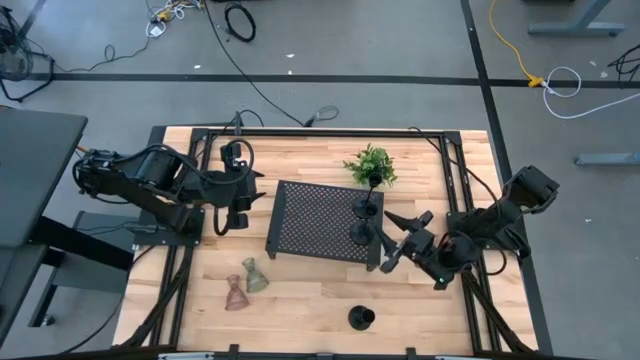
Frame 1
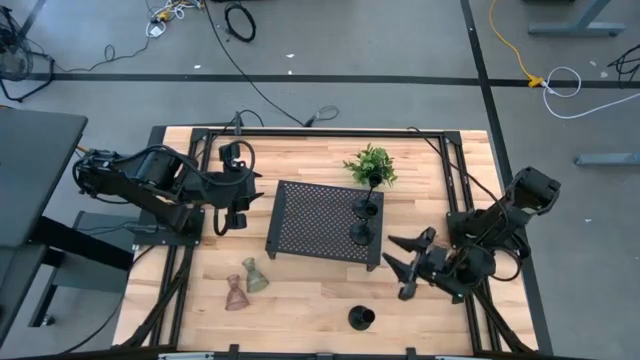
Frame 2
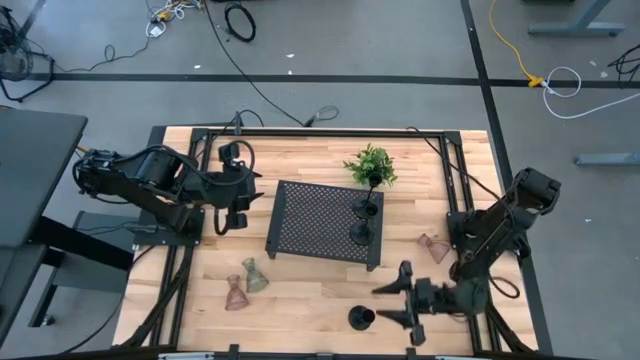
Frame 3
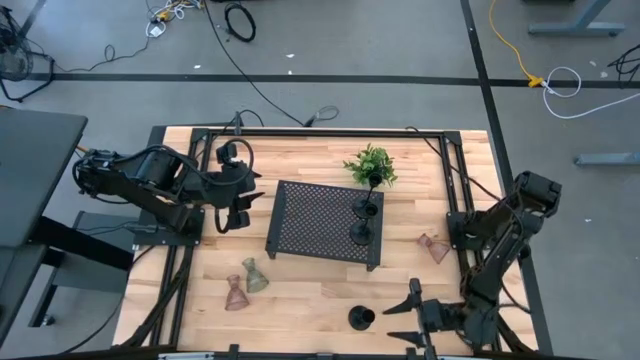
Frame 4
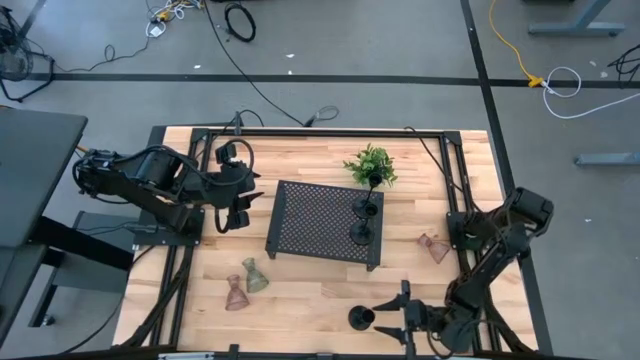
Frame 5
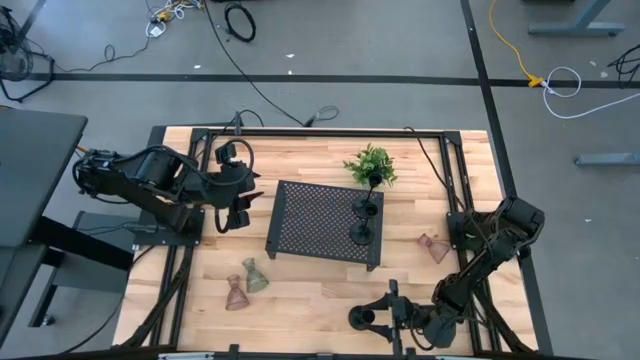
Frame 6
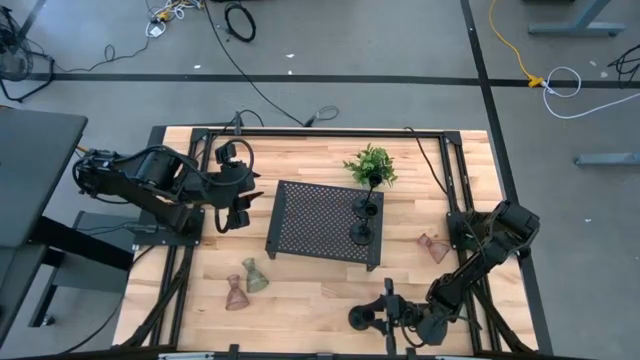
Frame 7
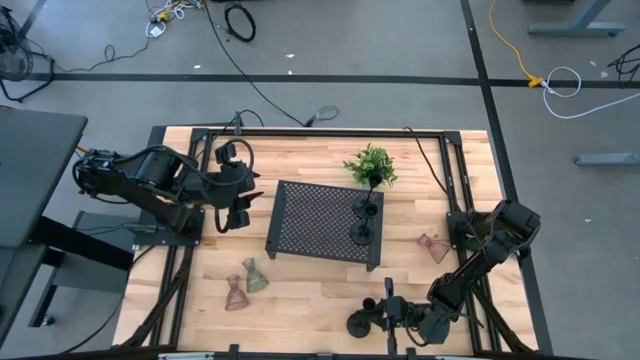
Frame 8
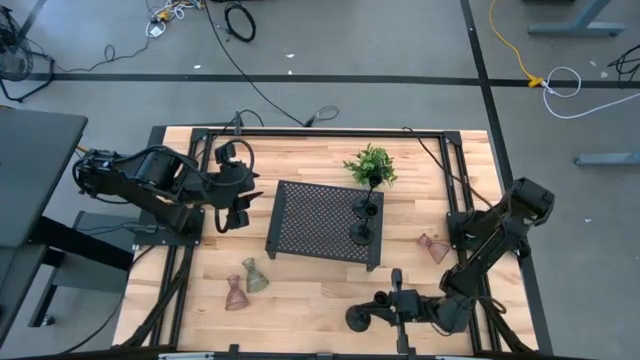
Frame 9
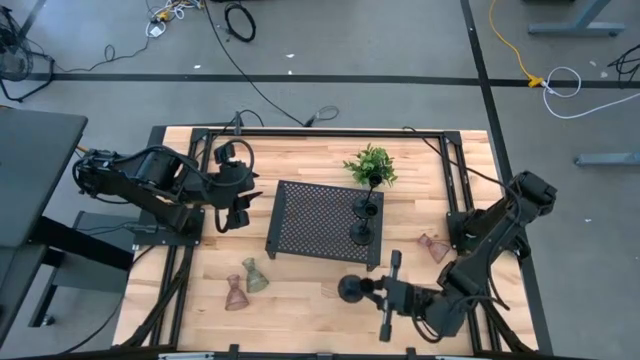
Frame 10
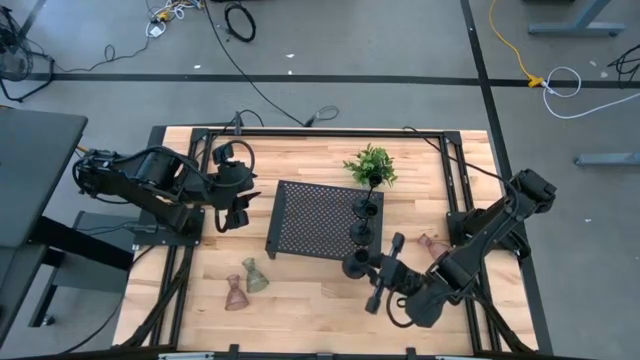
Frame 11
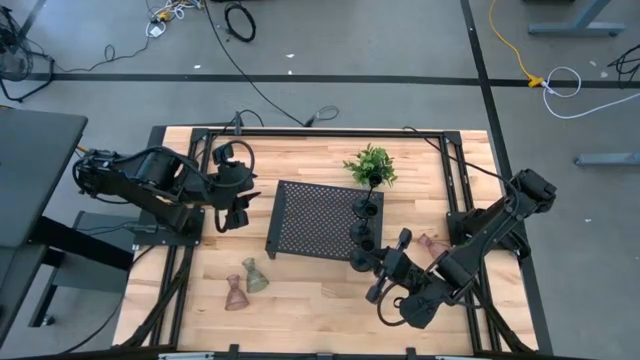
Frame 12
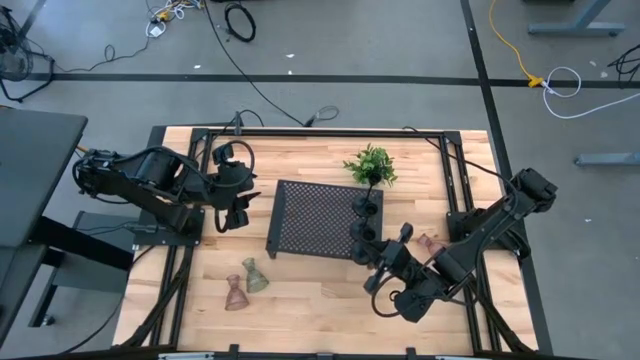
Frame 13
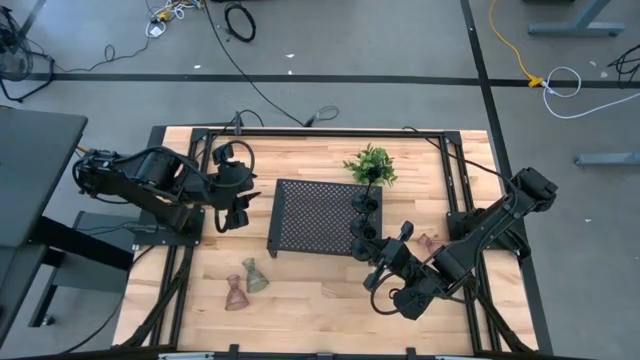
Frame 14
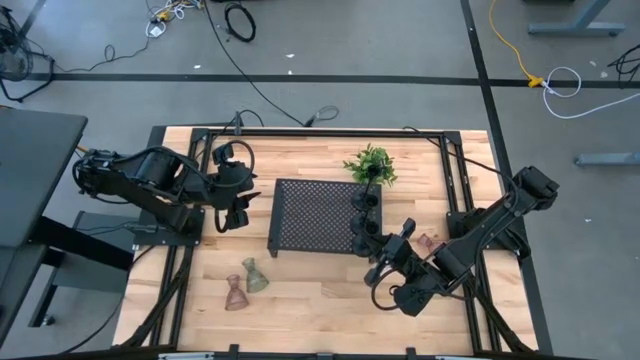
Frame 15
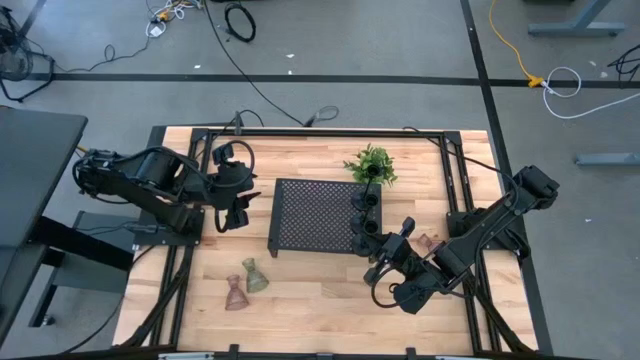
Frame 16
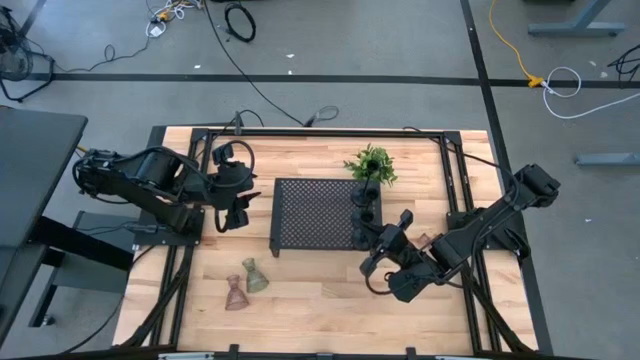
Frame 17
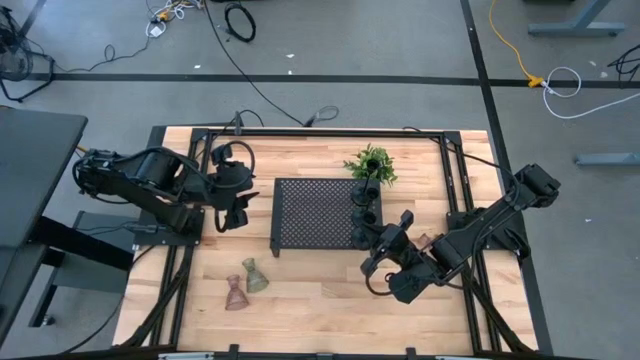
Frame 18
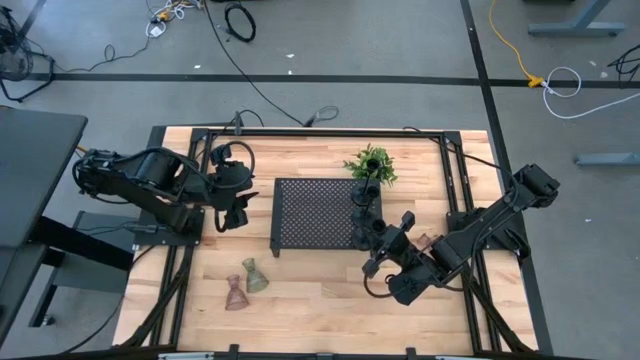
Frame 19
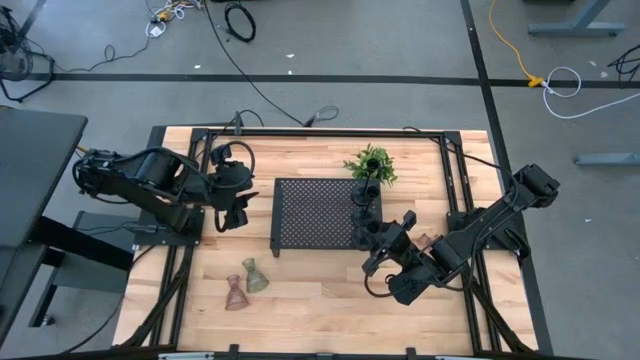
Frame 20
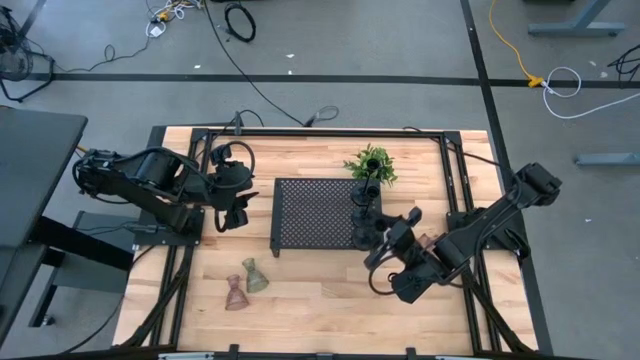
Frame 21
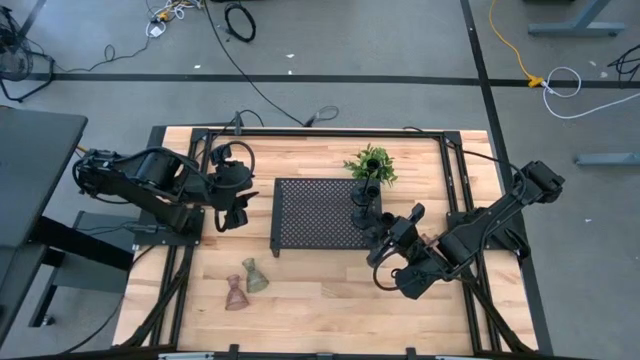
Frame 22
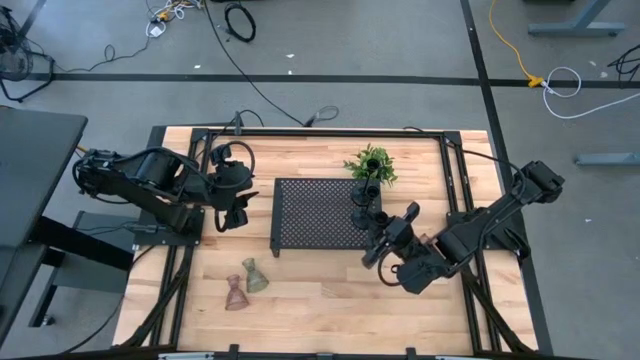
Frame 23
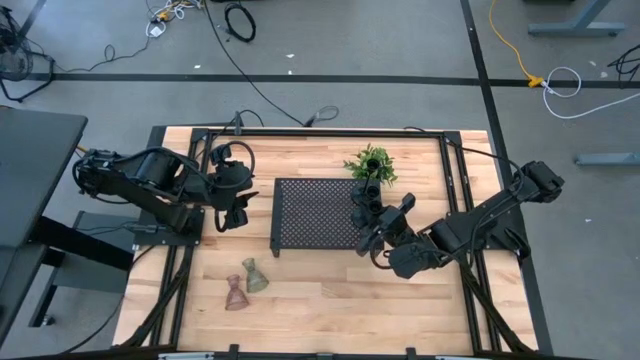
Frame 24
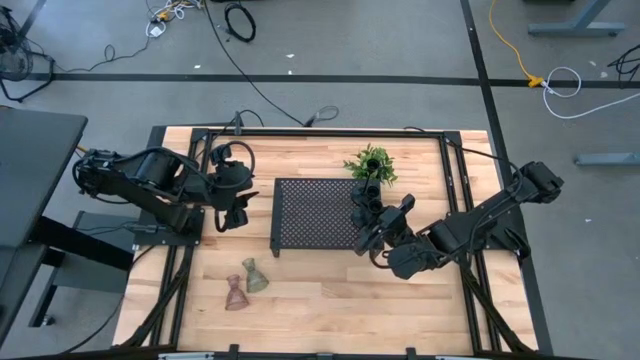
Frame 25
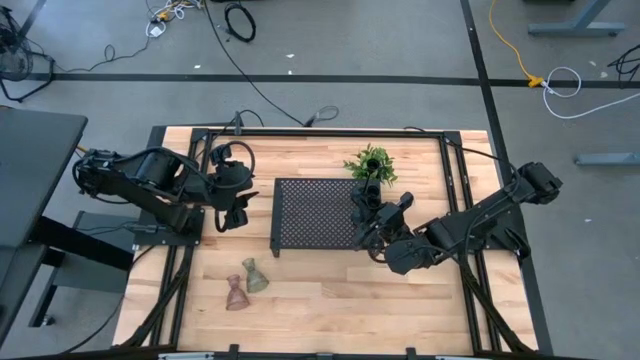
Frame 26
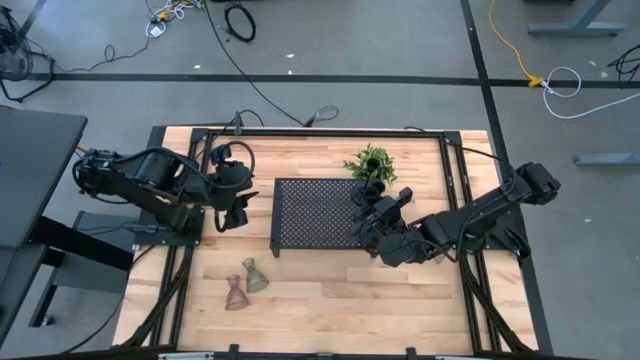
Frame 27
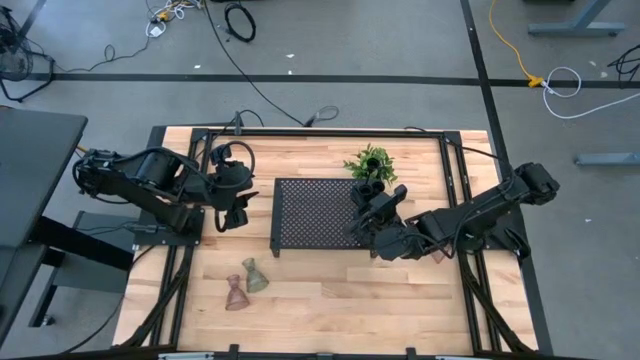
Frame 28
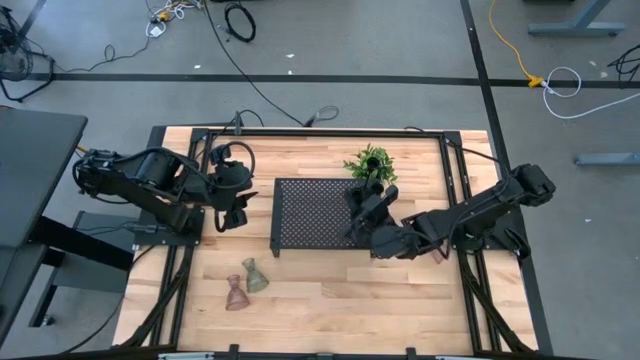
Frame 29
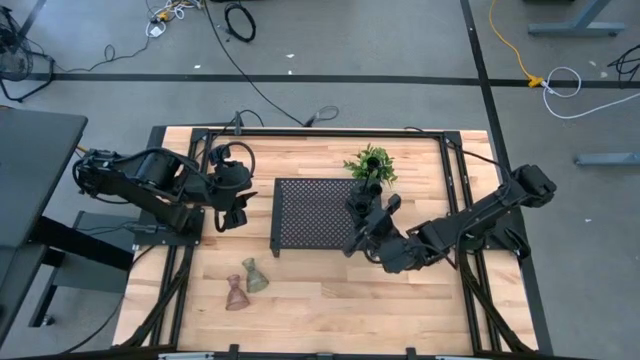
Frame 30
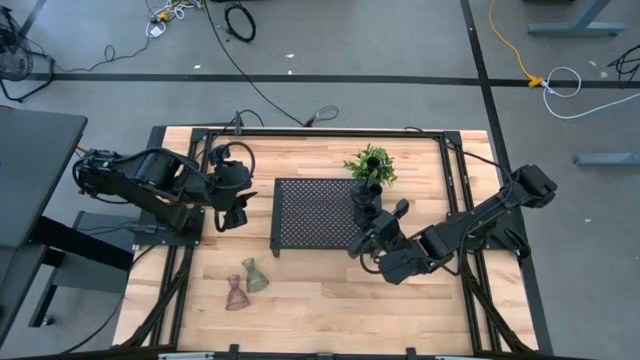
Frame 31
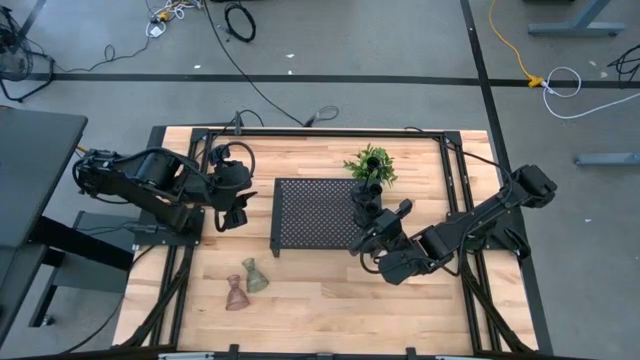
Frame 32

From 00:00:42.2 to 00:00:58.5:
Task: Pick & Place candle stick holders
Put the black metal candle holder on the shelf

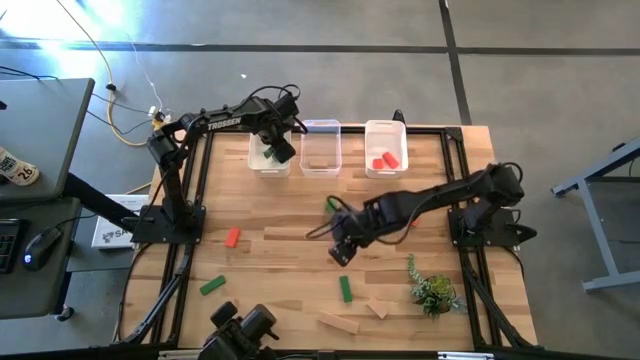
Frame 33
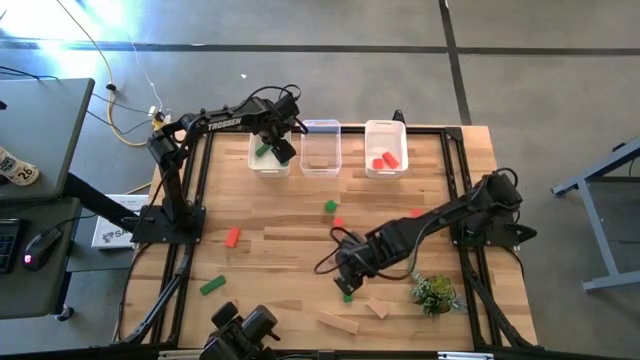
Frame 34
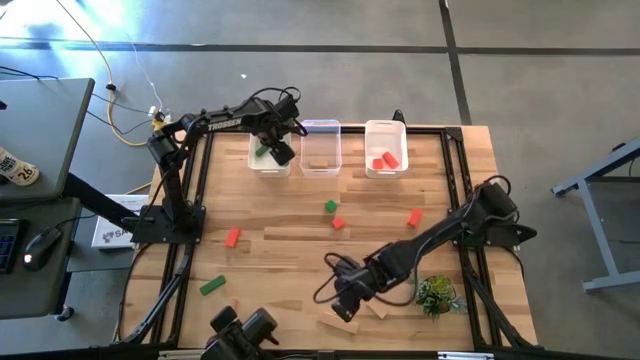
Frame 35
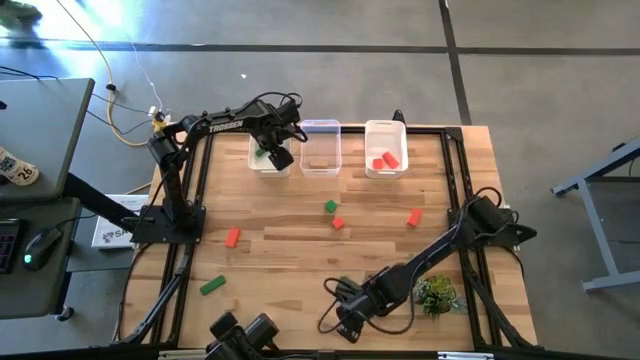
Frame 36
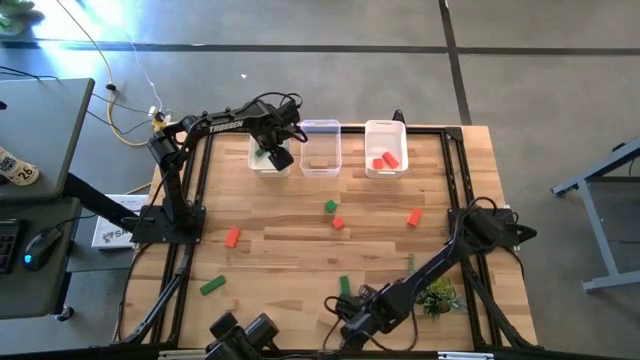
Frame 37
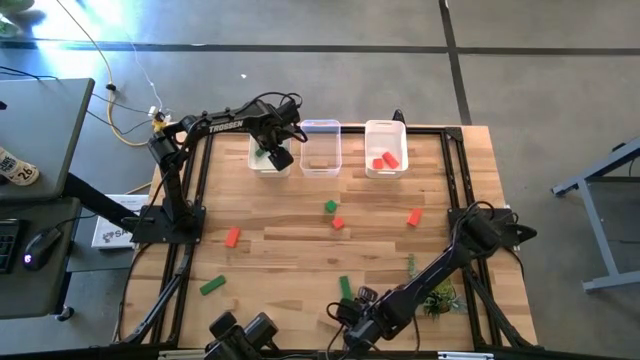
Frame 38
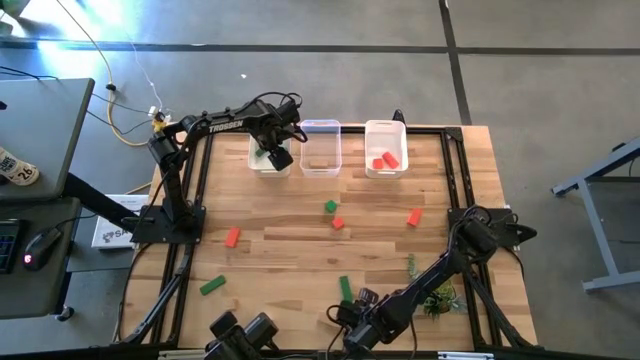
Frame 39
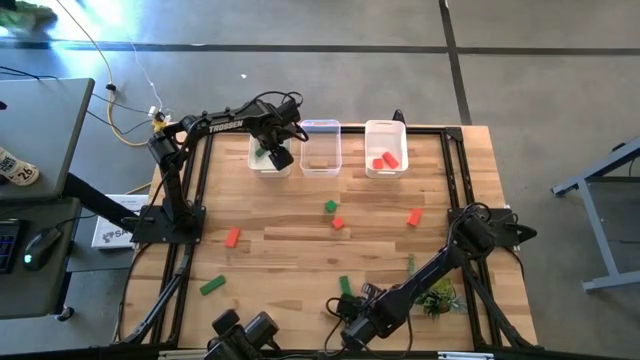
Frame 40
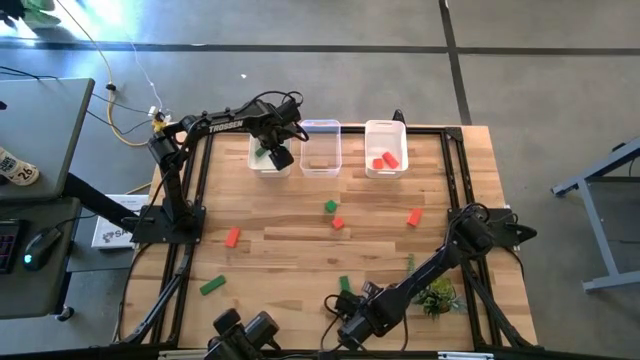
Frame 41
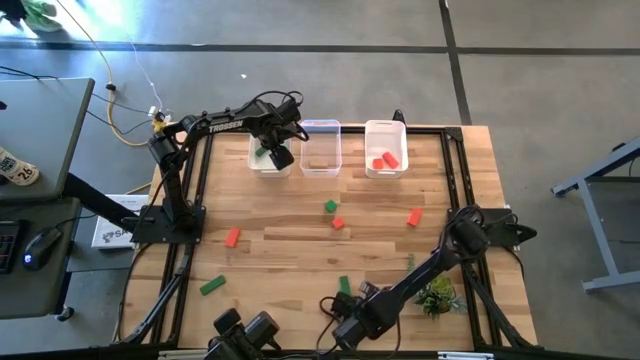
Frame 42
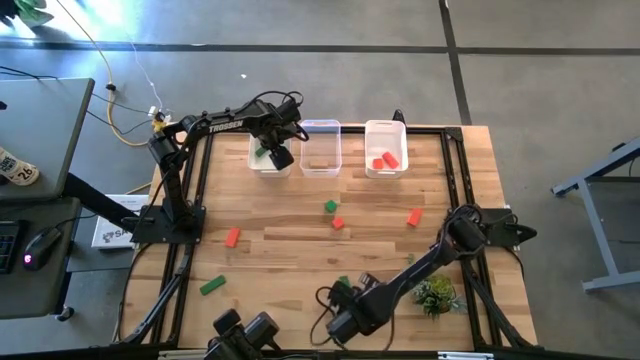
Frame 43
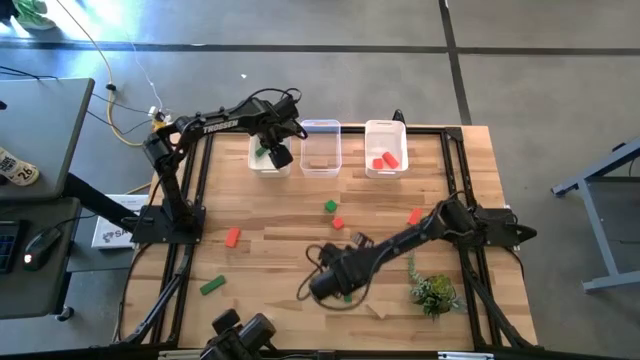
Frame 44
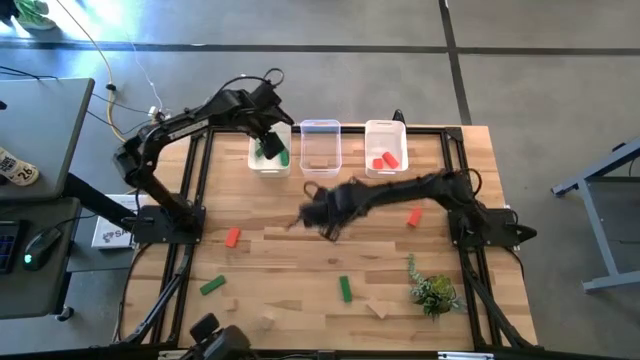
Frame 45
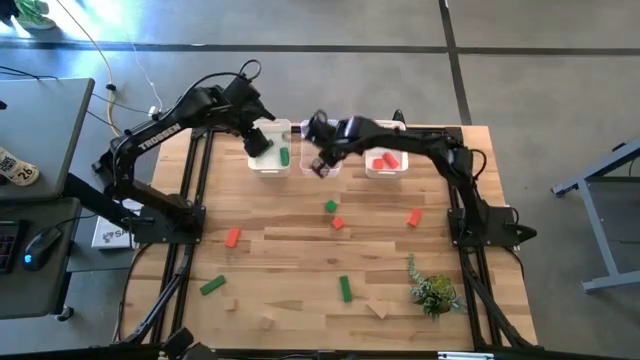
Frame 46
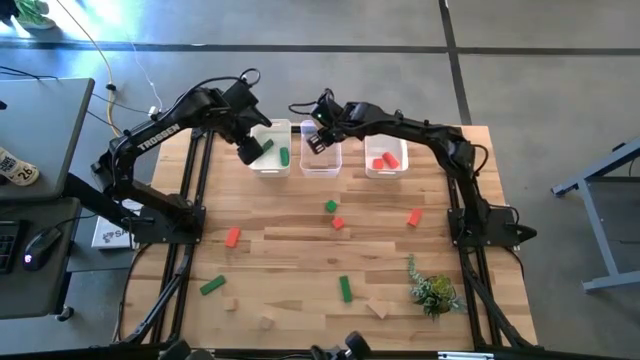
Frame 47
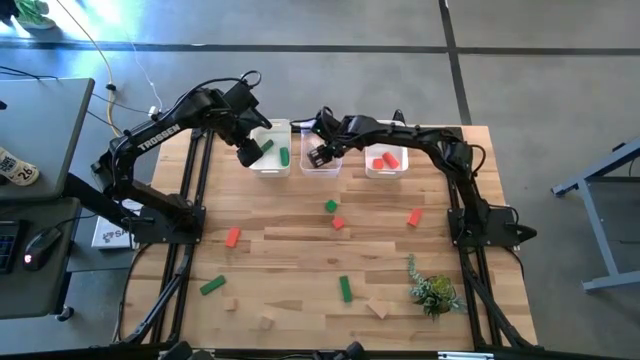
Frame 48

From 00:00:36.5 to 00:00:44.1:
Task: Sort & place blocks by color
Put the brown block into the transparent bin
